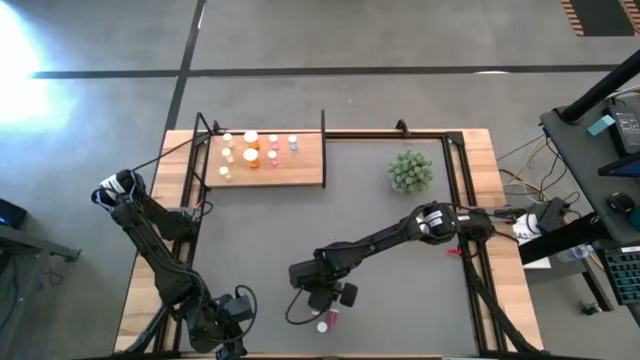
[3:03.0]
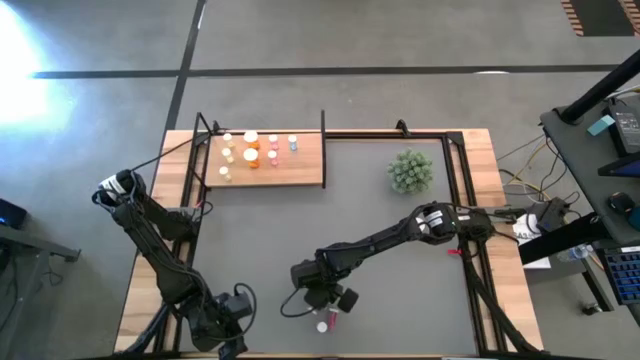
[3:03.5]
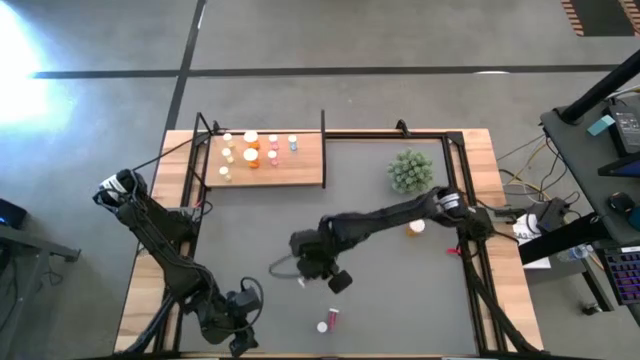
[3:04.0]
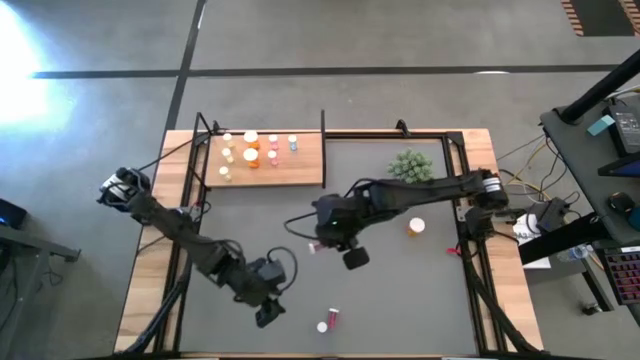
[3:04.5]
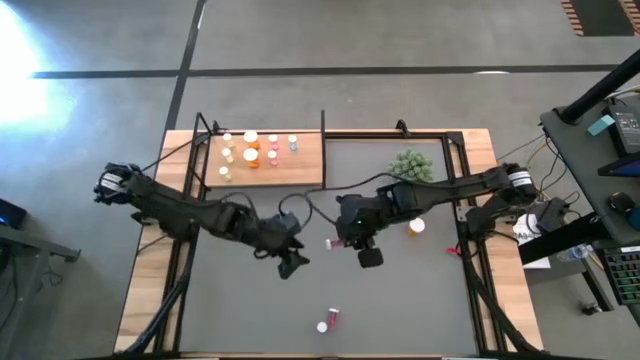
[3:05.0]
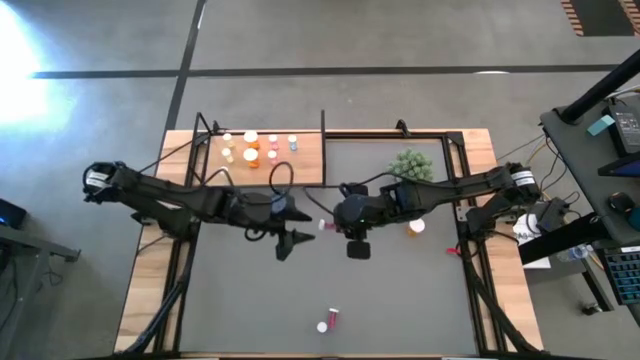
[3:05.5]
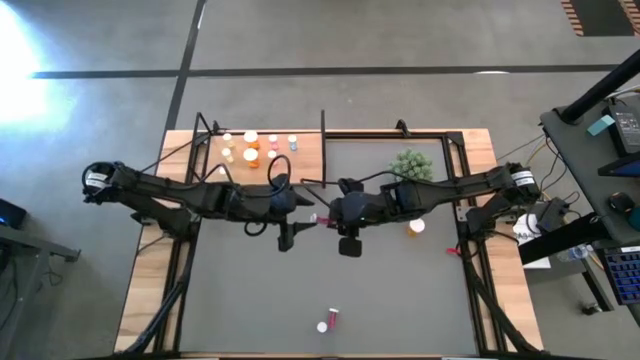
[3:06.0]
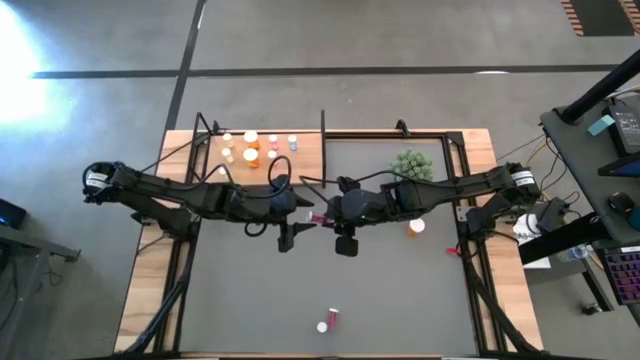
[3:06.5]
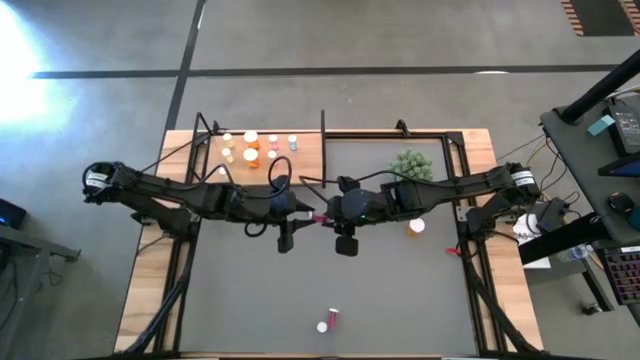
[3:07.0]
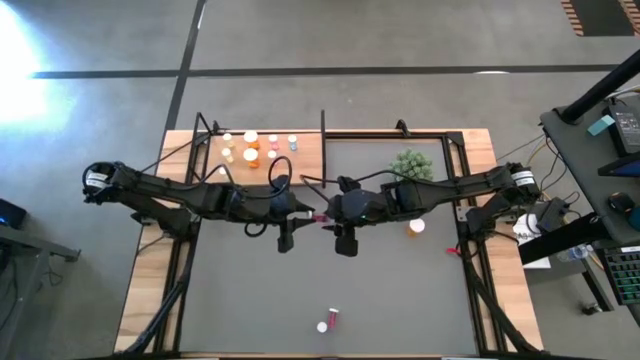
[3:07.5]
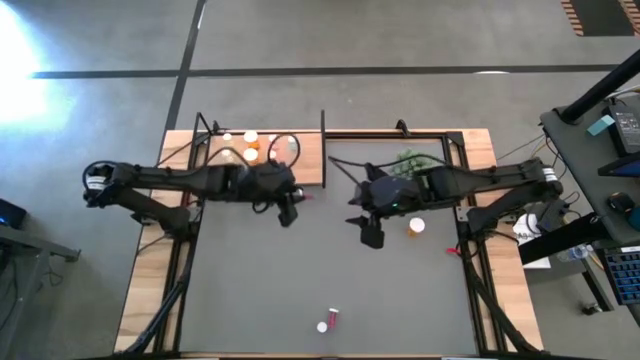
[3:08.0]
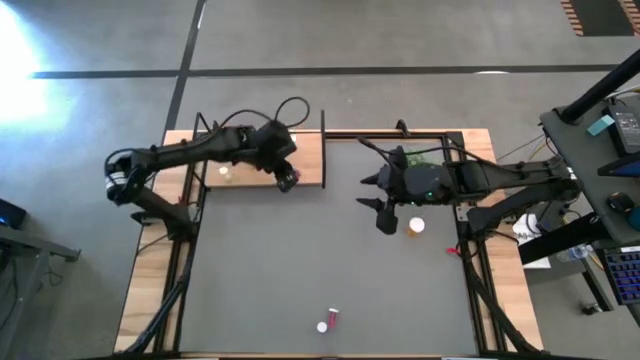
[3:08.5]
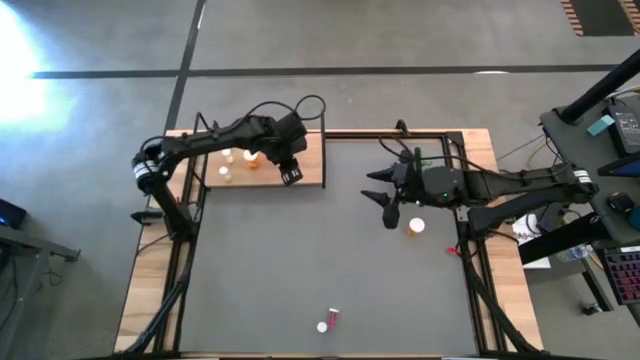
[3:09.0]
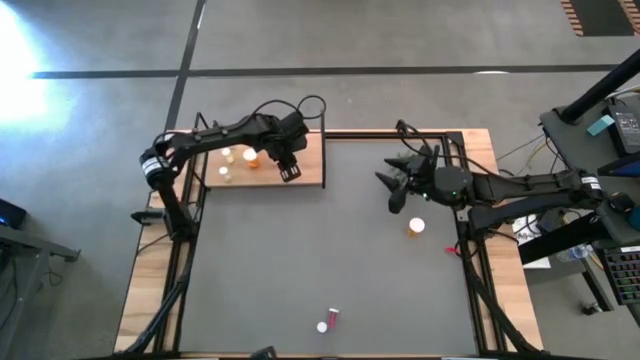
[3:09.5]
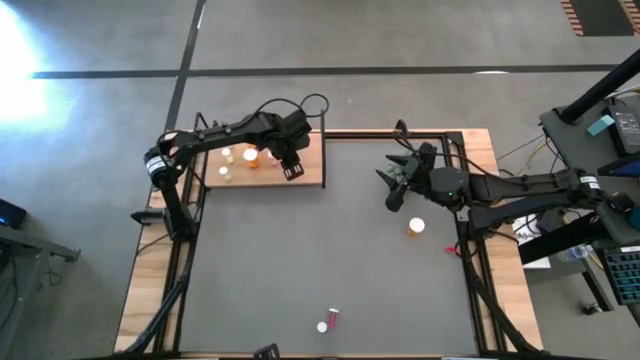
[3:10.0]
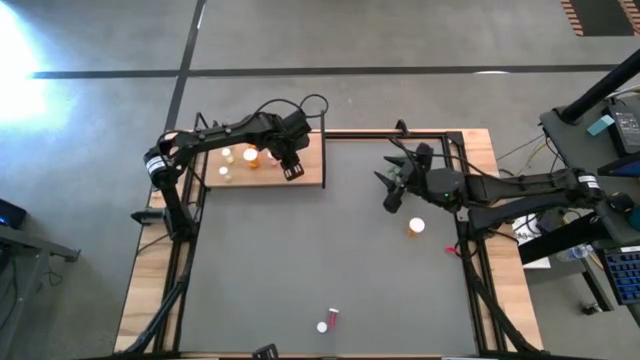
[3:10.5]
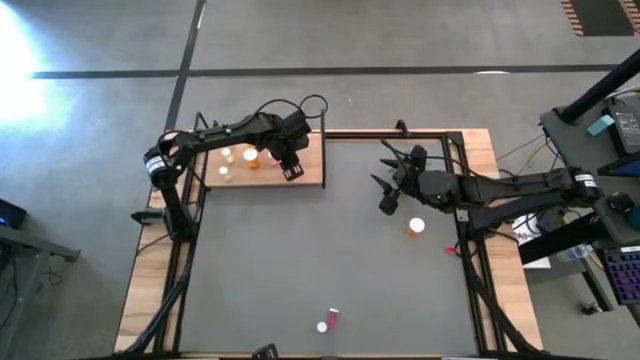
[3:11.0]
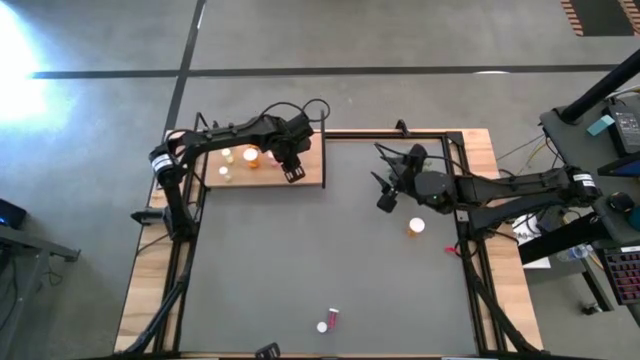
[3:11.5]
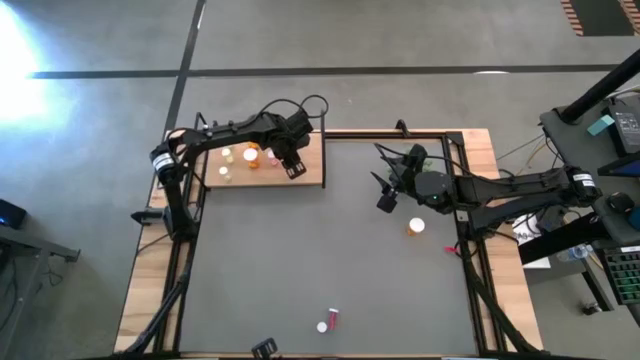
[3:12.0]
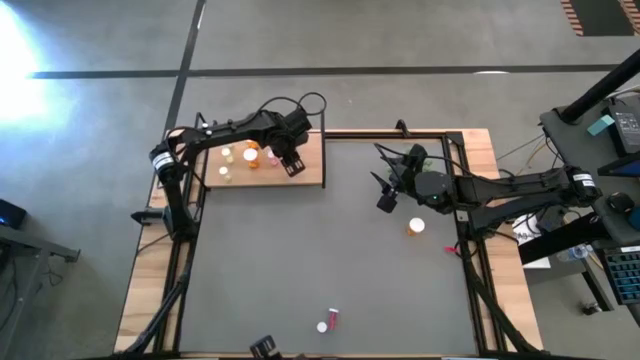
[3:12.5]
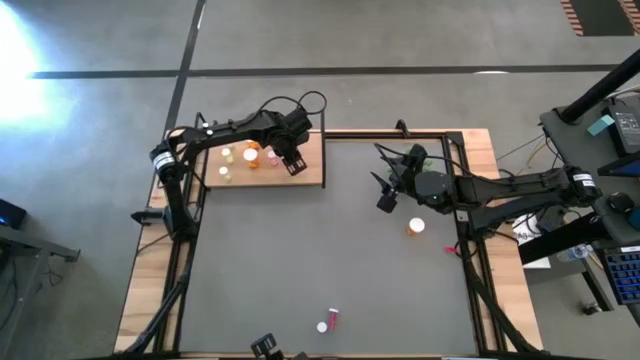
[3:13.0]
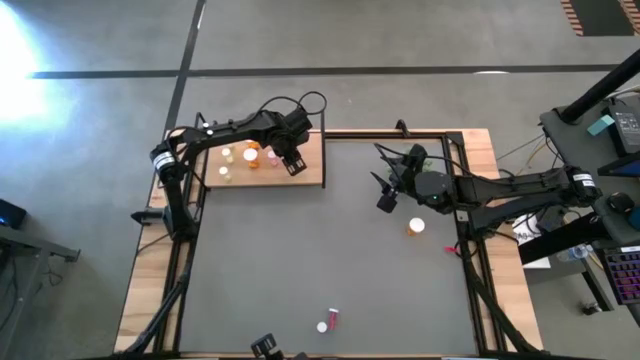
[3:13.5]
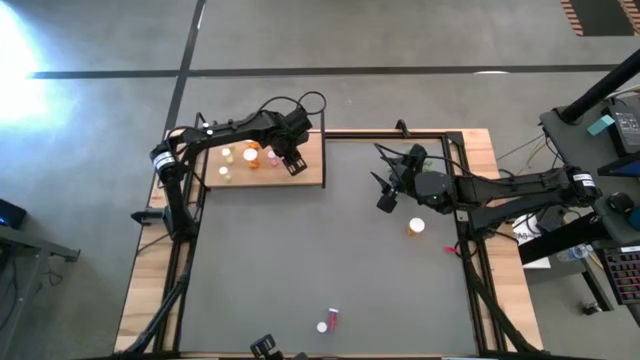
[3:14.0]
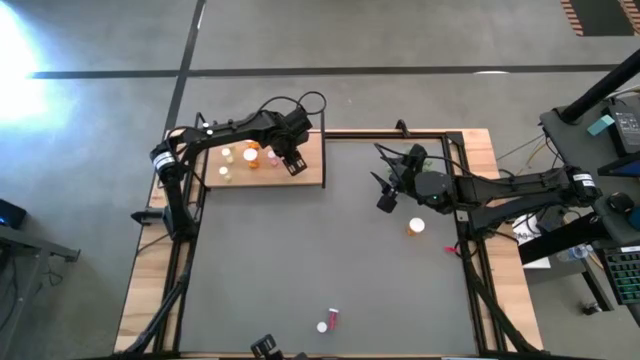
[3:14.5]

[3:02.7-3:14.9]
Task: Pick and place medicine bottles onto shelf by color
Put the top blue pill bottle on the shelf aligned with the other blue bottle

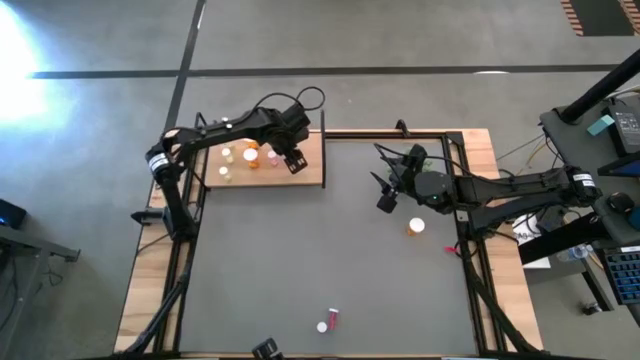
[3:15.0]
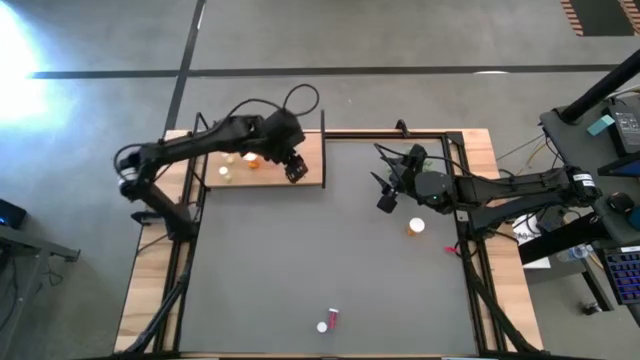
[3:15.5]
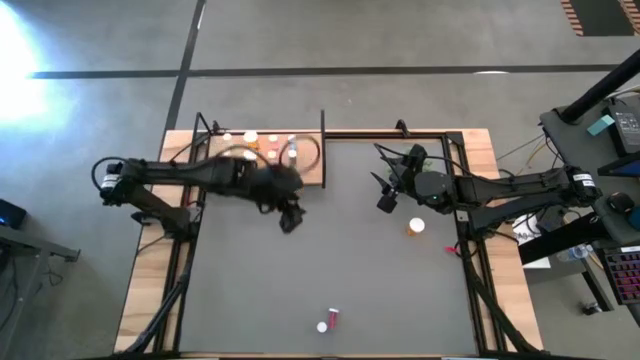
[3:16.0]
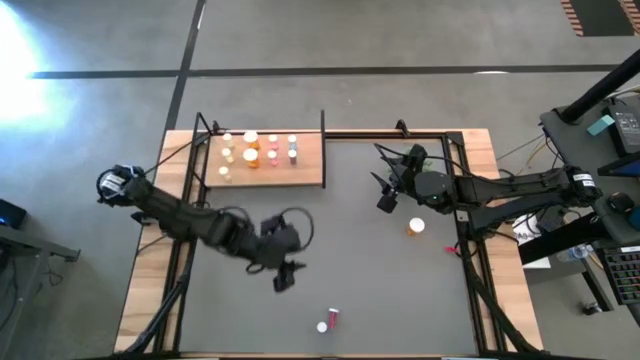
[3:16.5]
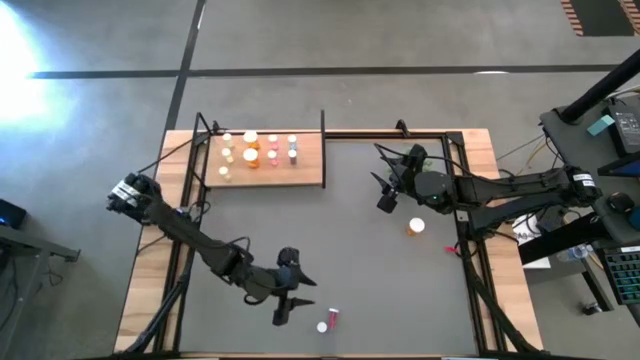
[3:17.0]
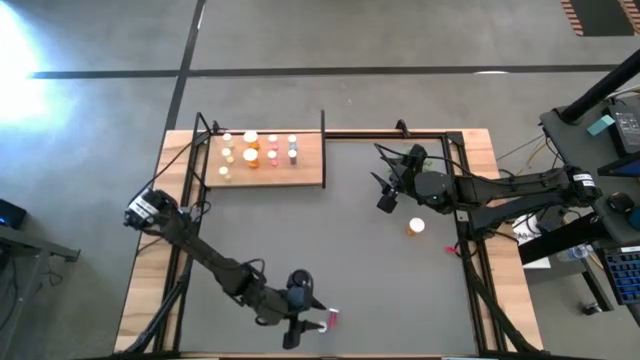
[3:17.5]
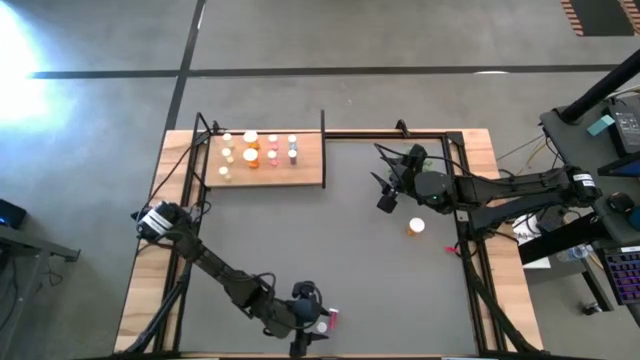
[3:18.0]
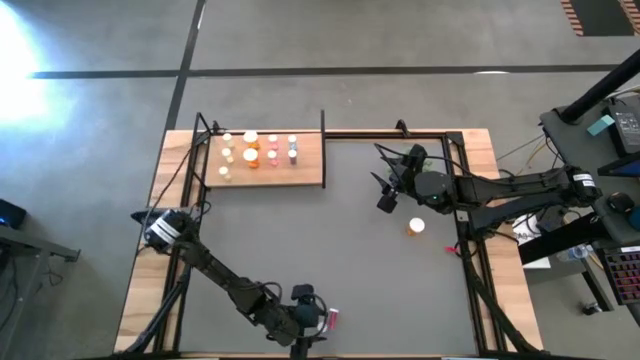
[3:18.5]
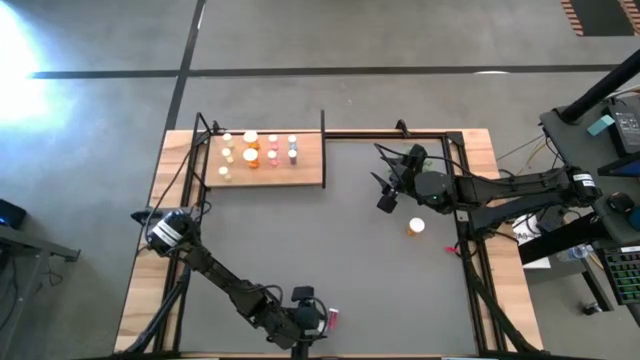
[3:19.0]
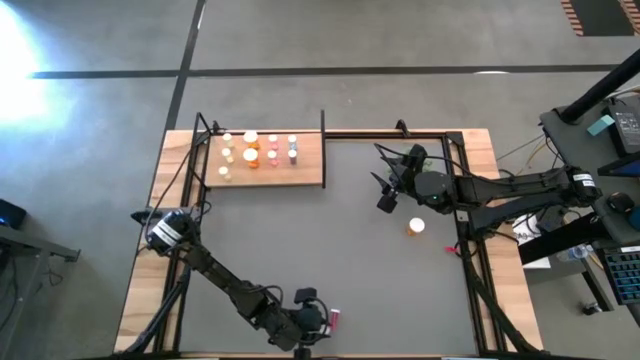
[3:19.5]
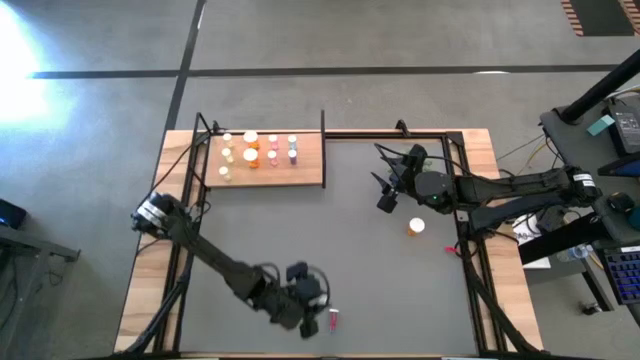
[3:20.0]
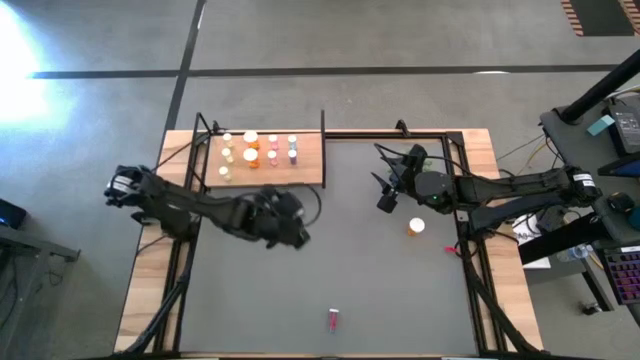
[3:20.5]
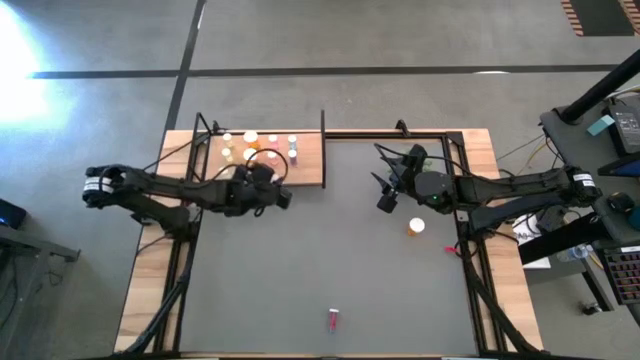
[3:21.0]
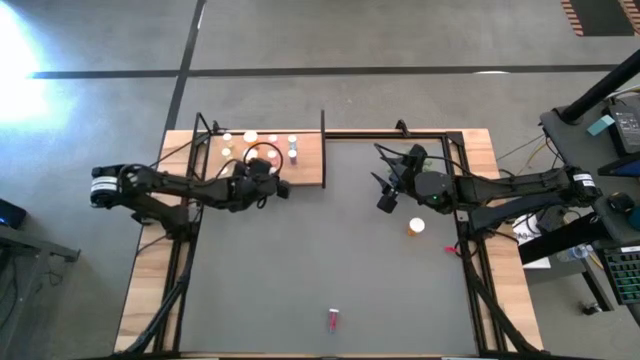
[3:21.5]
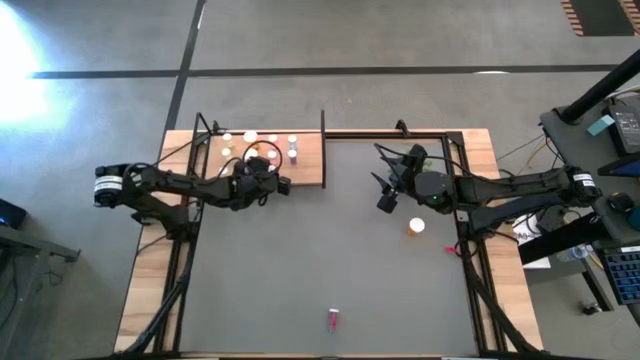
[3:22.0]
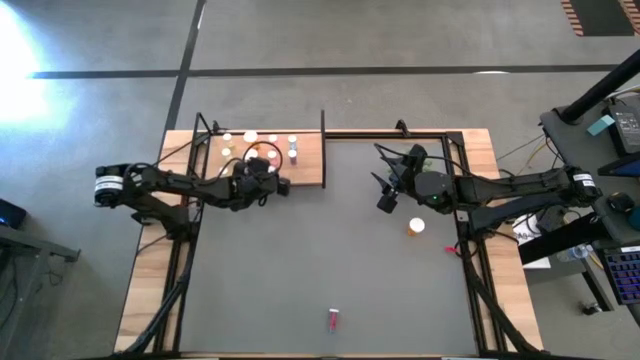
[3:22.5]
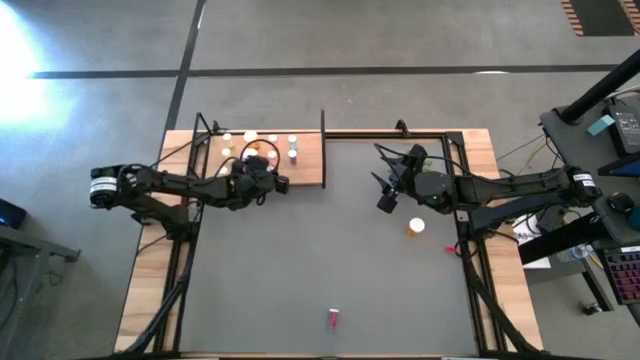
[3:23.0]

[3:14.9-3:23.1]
Put the pink pill bottle on the shelf aligned with the other pink bottles
